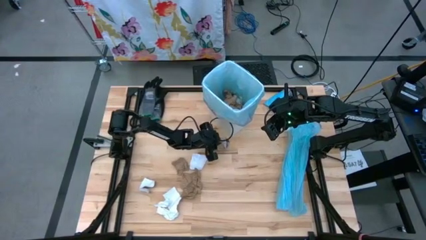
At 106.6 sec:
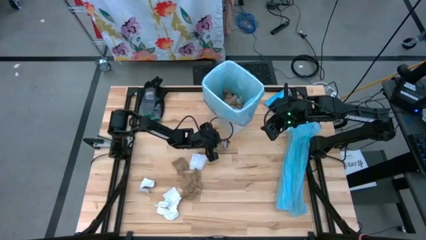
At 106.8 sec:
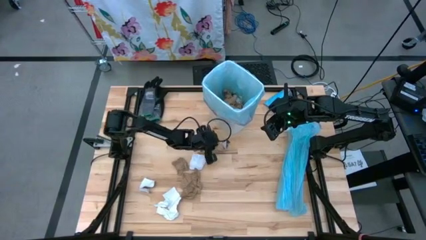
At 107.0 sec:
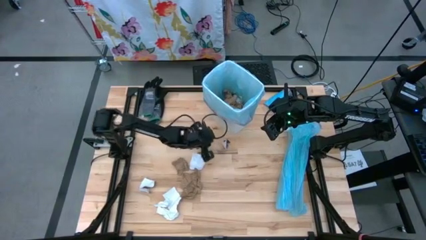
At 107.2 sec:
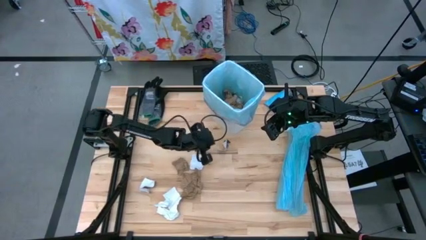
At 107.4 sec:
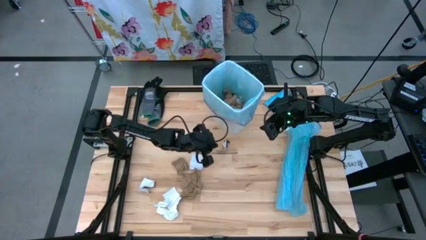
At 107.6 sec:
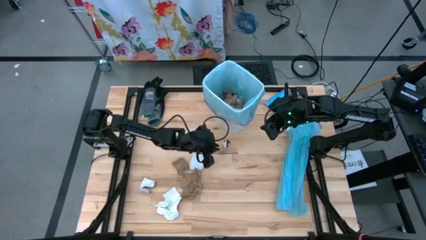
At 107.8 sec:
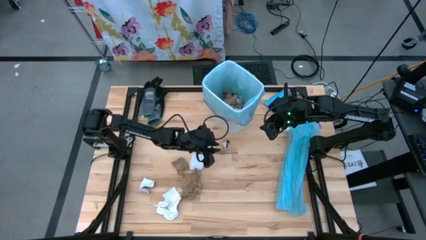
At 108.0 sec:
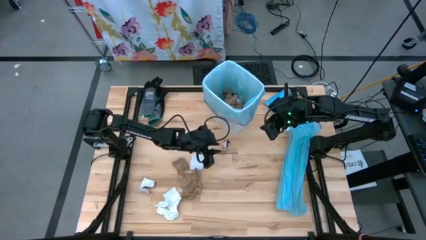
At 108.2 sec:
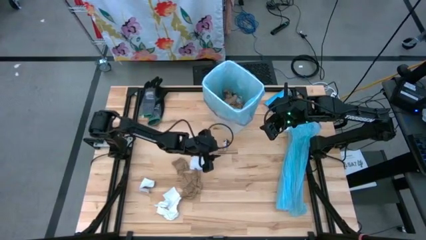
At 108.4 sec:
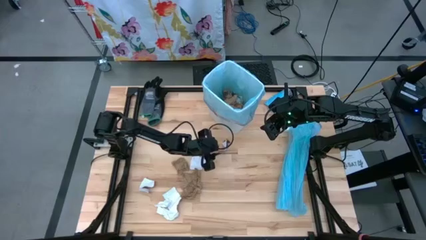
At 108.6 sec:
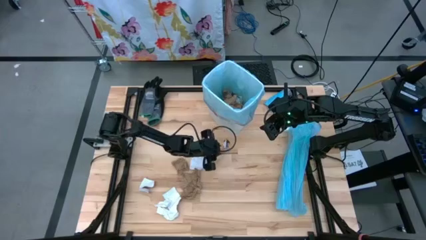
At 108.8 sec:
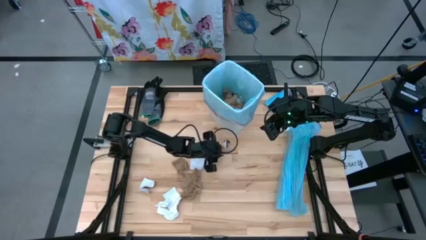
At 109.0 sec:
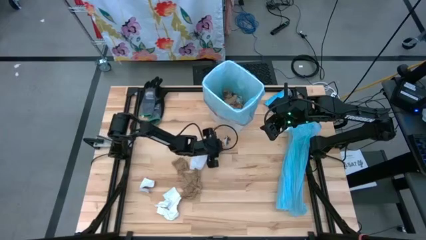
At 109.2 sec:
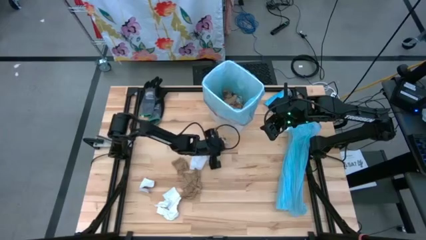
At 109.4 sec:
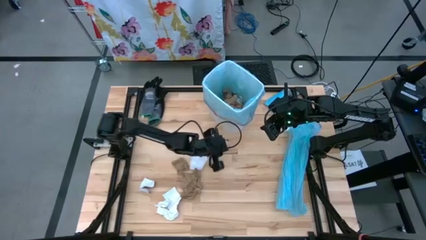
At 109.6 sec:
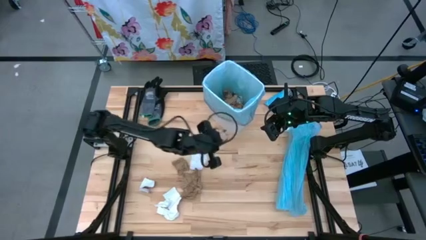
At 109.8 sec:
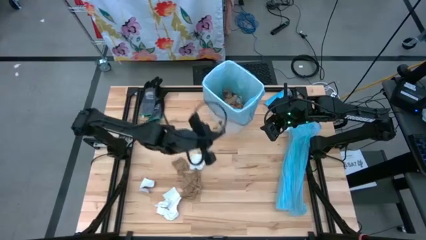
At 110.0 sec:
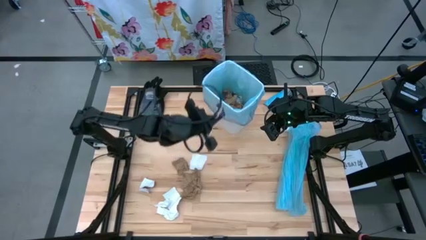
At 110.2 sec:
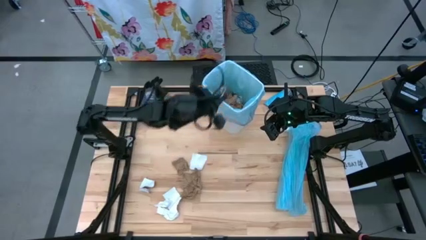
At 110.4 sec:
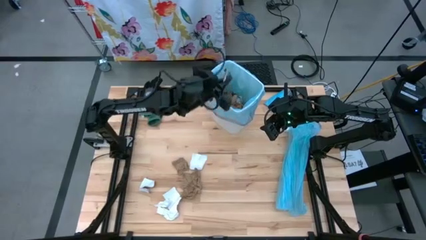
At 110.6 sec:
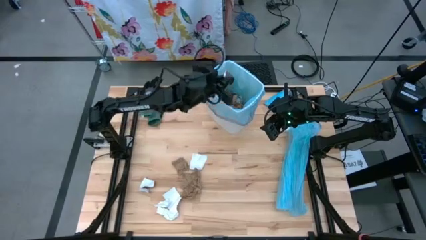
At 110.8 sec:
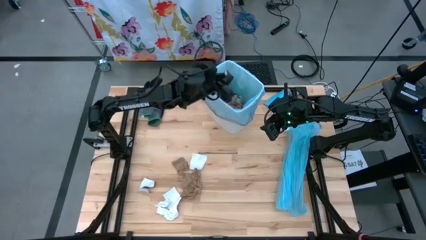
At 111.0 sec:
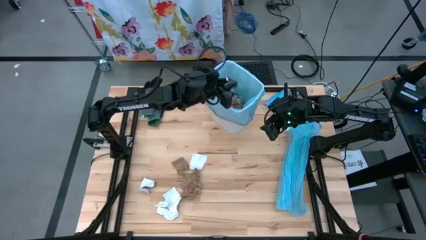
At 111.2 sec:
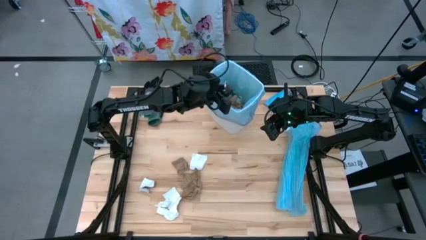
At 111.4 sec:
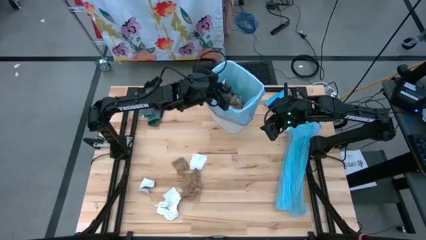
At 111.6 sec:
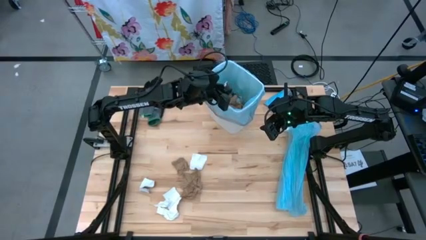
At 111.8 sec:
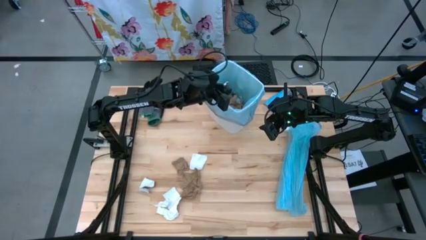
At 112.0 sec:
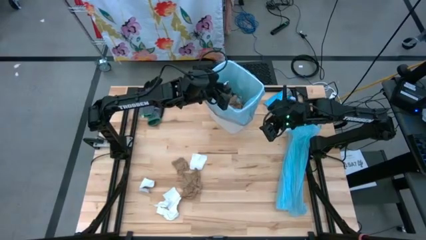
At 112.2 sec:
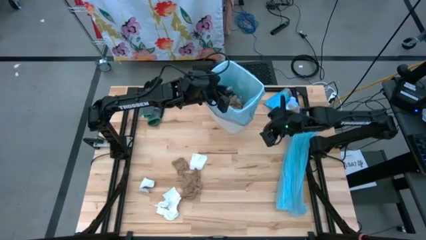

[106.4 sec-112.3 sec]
Task: place trash/remove bag and relplace
Put the right white paper into the trash bin

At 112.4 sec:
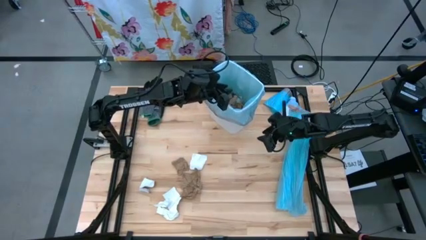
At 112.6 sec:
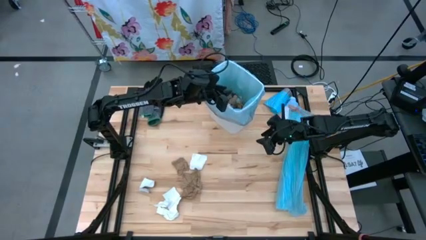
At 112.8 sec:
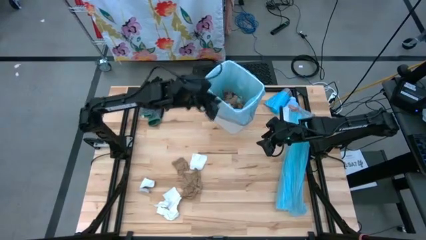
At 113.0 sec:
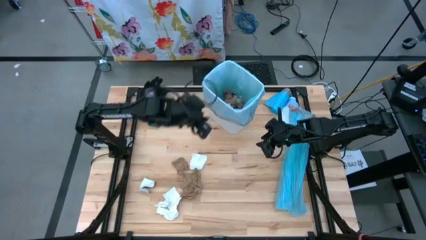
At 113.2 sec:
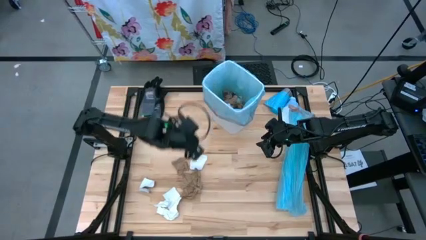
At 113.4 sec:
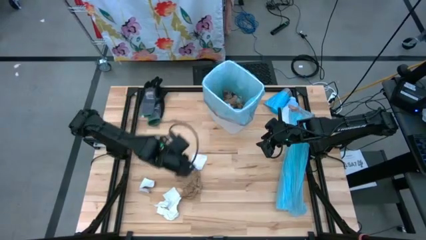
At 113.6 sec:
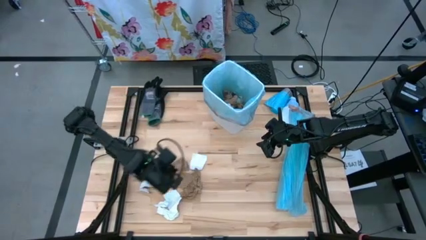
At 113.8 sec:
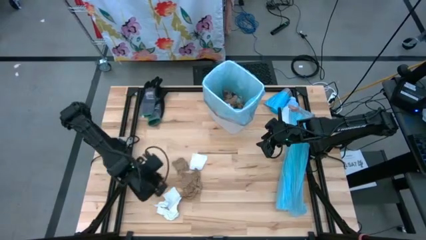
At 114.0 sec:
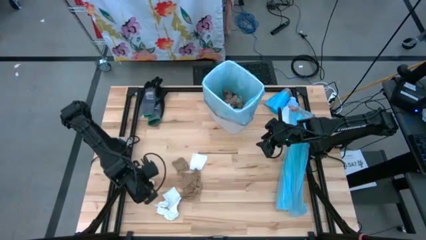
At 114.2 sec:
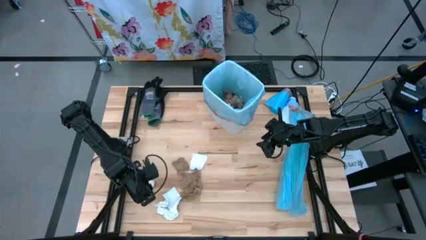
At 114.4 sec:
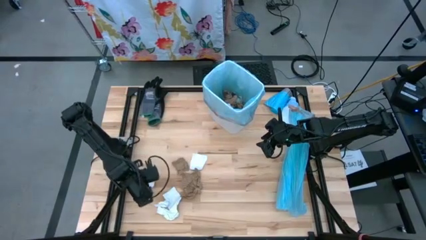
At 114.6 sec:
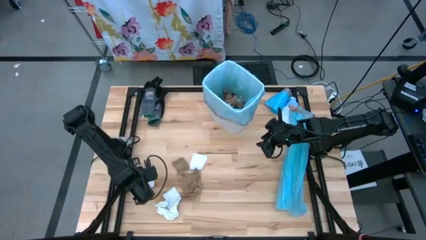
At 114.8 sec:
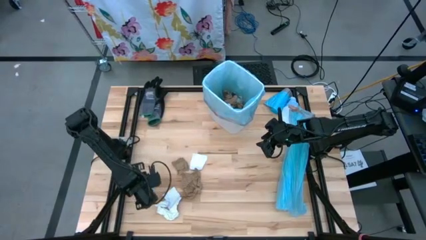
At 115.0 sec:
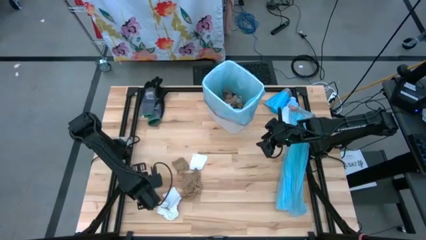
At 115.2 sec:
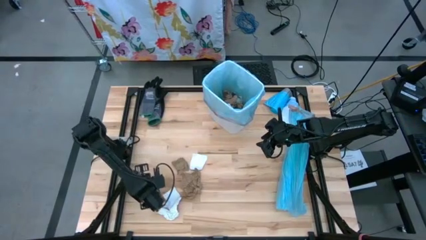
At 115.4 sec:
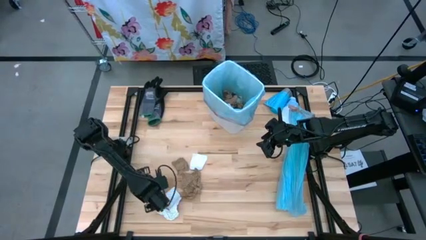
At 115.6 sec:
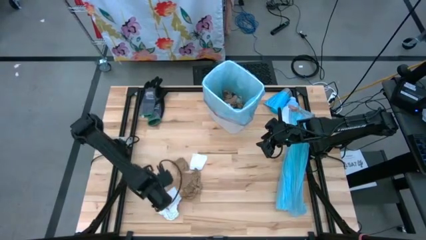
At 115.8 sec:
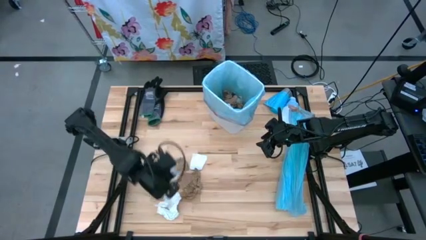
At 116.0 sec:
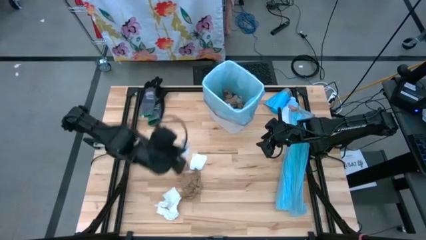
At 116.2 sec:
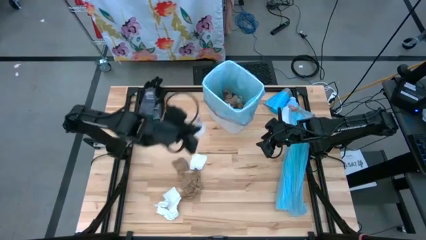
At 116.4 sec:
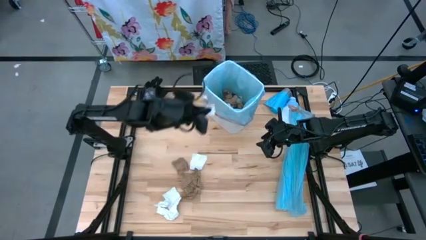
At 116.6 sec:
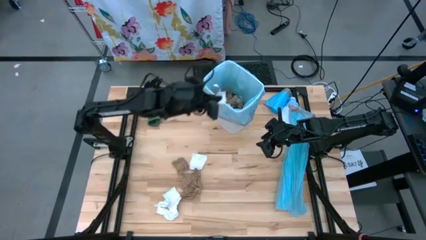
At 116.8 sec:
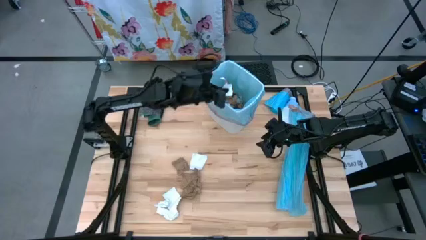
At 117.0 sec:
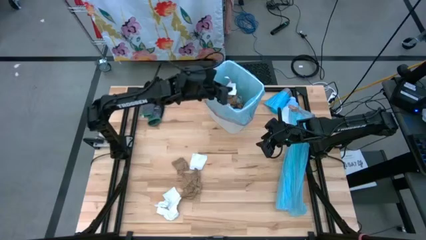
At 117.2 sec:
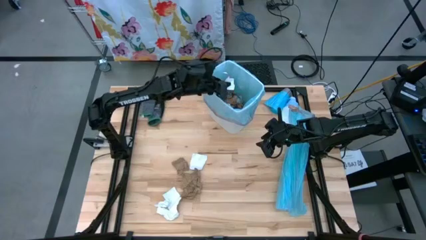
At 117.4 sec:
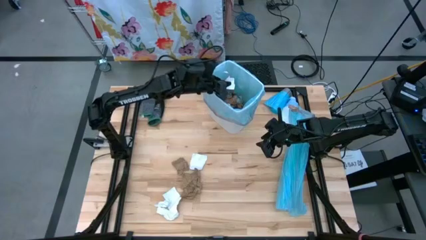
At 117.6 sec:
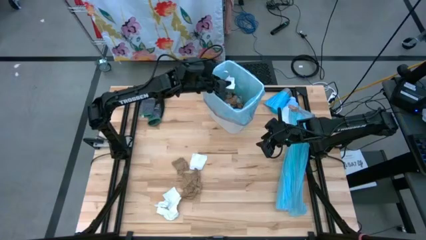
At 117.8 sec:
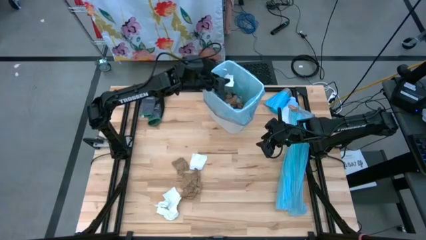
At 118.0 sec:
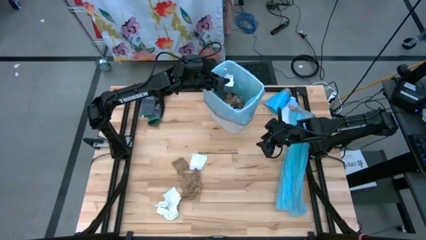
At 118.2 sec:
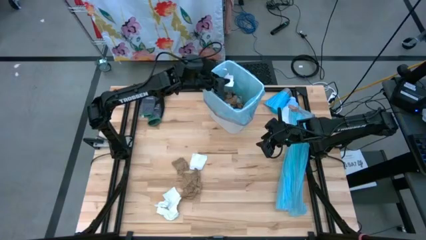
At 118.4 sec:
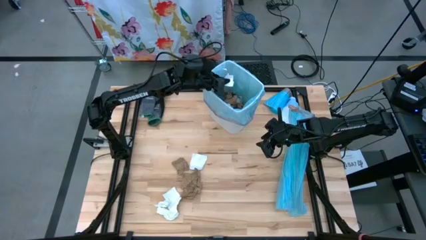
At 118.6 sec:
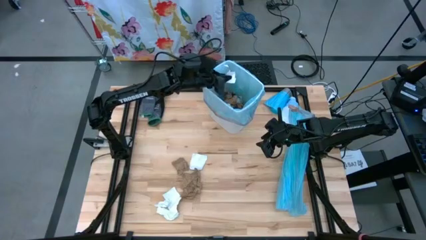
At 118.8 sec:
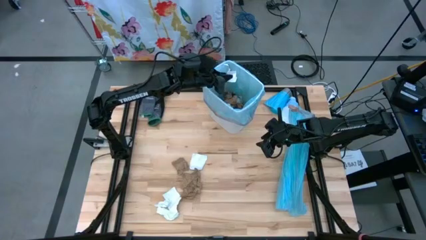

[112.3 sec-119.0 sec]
Put the white paper into the trash bin

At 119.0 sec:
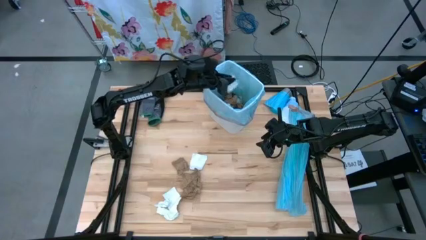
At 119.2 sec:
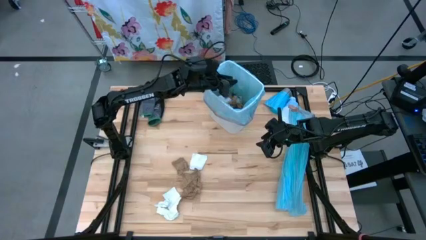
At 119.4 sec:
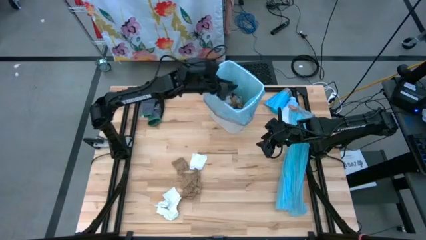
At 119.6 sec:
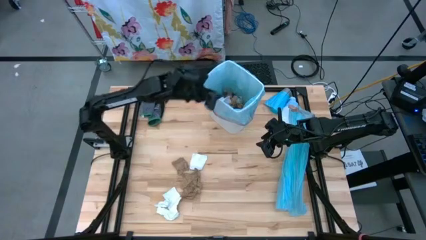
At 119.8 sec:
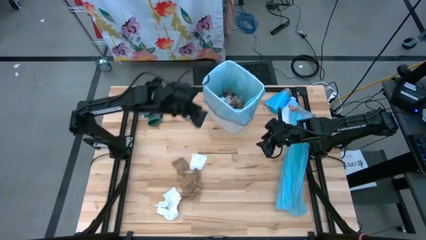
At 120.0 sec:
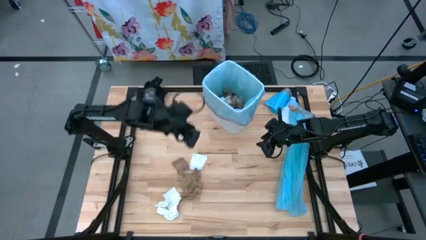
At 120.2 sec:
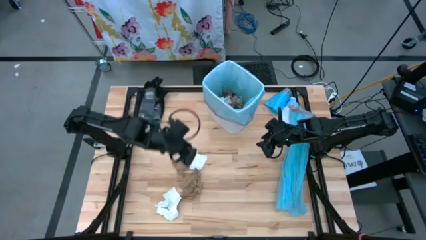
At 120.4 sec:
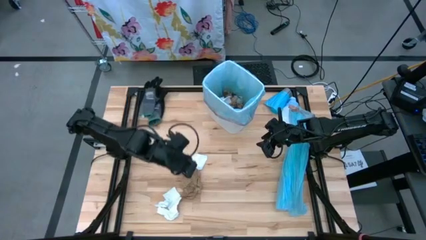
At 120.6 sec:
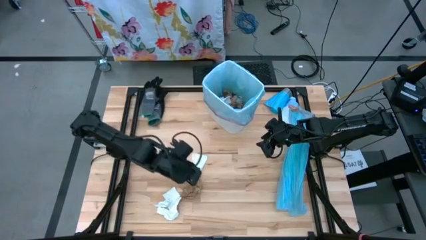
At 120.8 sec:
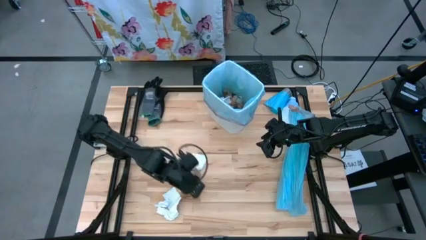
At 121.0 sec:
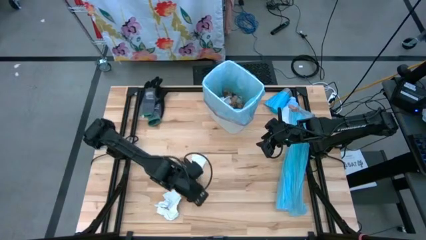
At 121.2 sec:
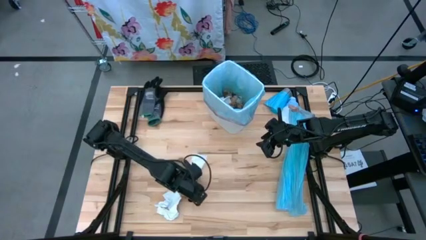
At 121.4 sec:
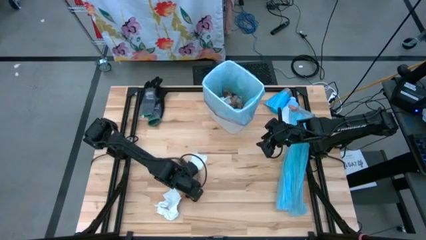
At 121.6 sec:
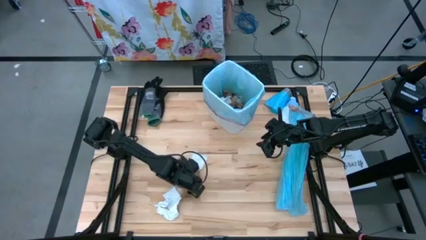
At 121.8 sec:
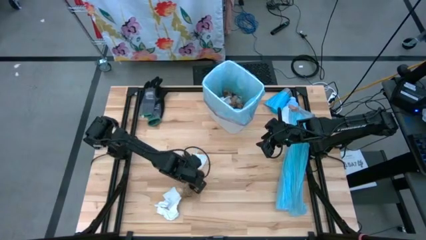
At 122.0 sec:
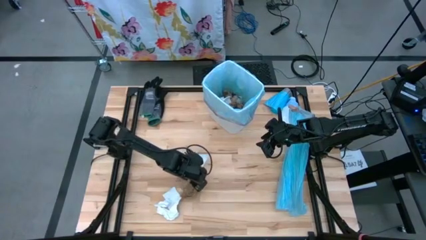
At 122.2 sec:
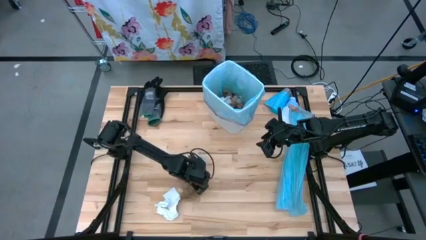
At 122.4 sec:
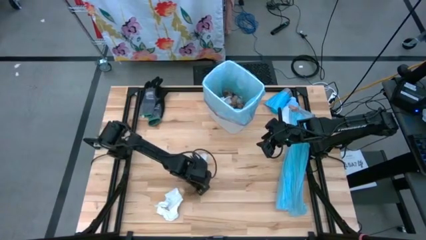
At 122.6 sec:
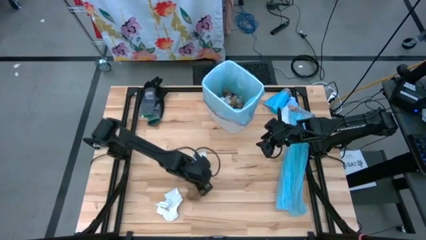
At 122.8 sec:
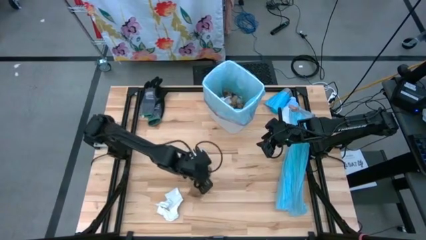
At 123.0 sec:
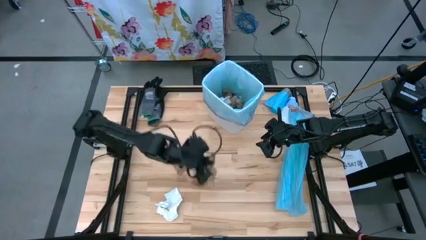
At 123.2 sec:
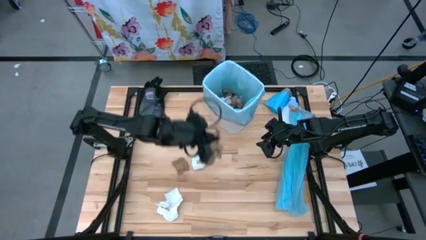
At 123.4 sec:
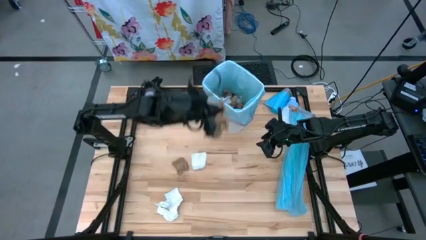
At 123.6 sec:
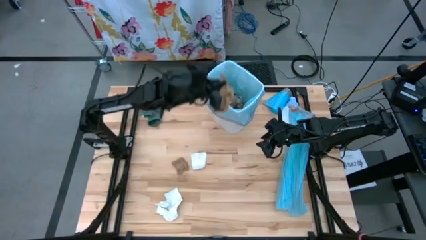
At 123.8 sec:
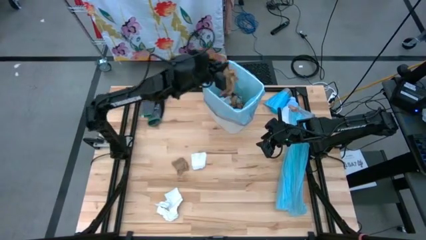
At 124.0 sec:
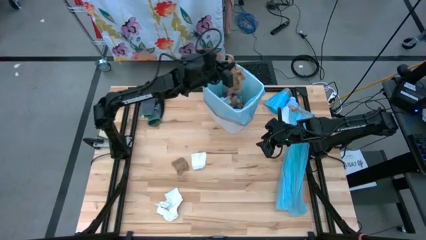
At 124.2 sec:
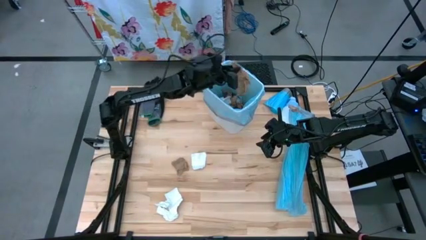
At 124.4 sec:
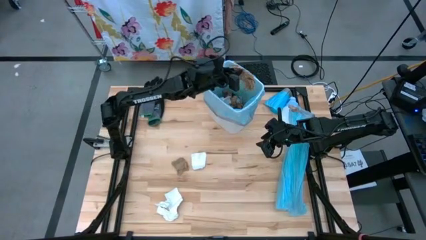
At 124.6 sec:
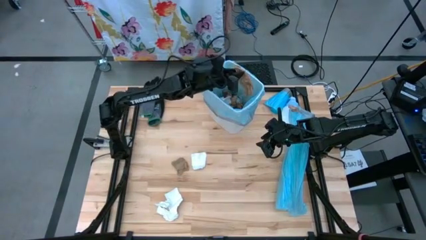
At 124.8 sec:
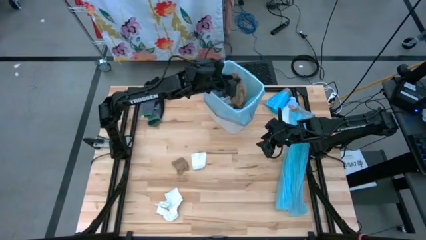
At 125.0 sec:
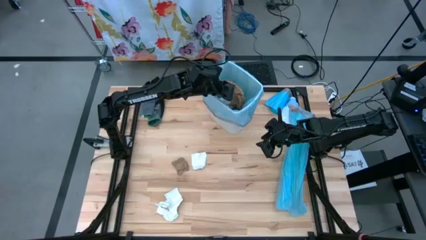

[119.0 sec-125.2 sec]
Put the brown napkin into the trash bin
